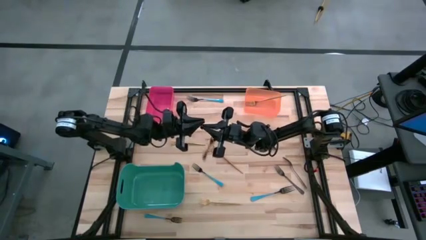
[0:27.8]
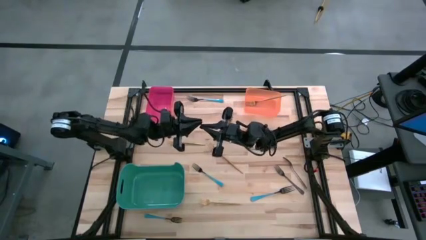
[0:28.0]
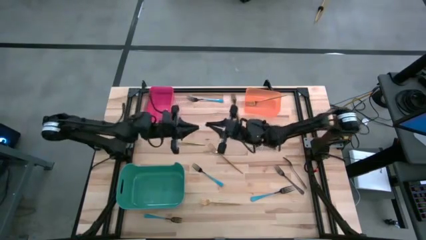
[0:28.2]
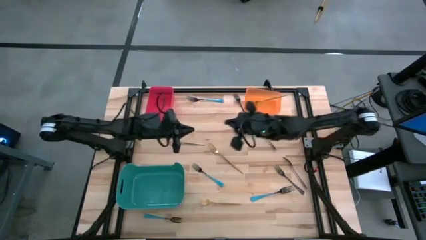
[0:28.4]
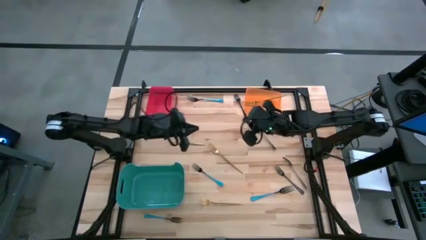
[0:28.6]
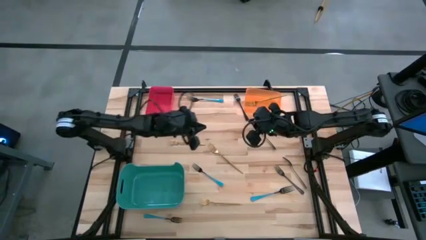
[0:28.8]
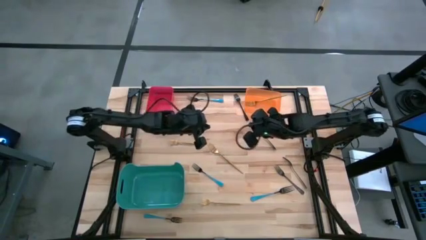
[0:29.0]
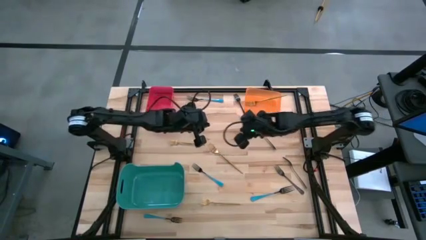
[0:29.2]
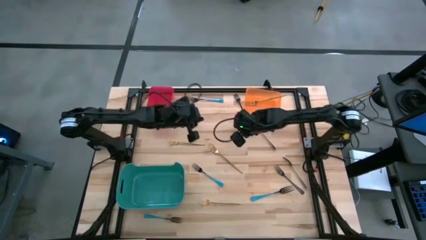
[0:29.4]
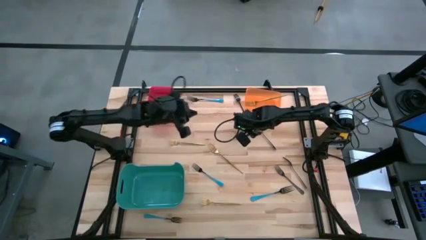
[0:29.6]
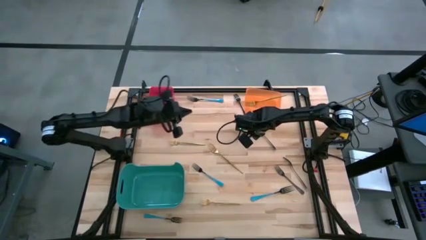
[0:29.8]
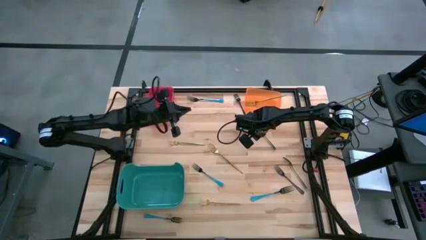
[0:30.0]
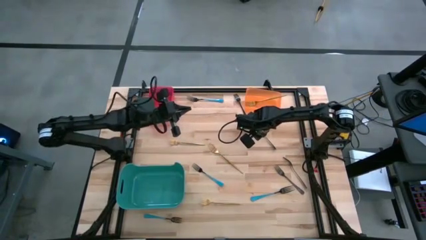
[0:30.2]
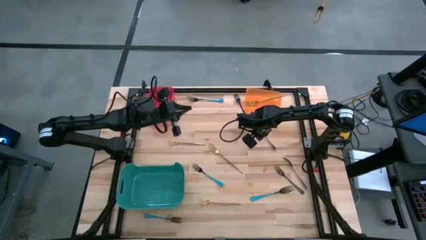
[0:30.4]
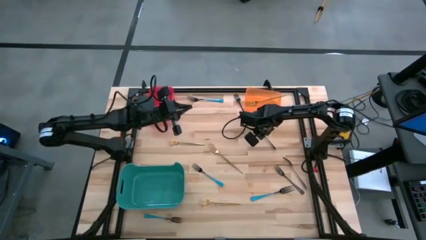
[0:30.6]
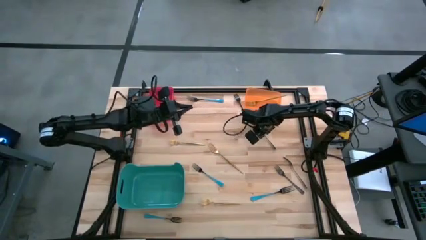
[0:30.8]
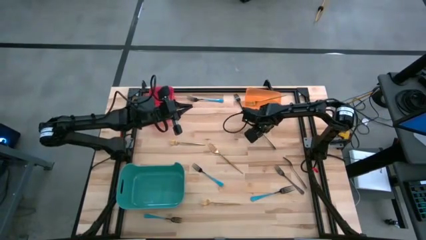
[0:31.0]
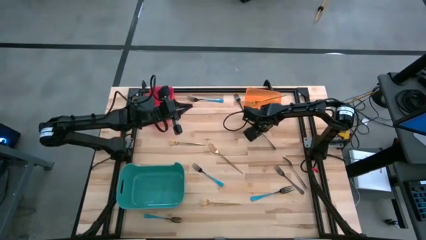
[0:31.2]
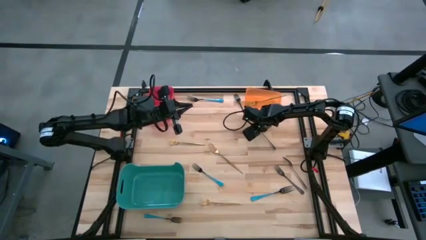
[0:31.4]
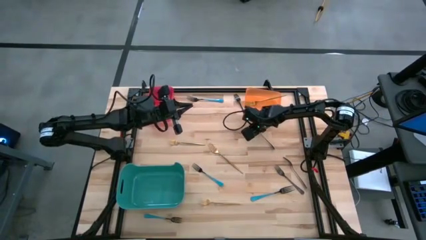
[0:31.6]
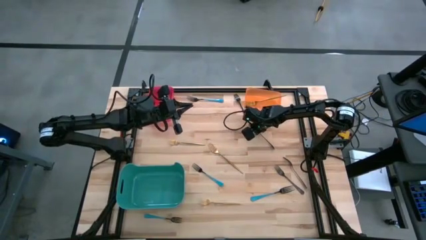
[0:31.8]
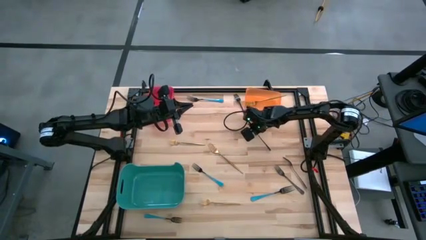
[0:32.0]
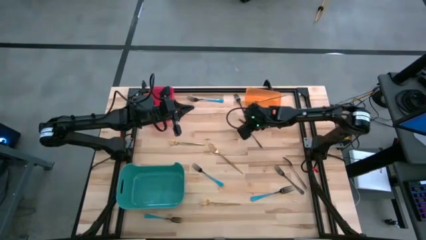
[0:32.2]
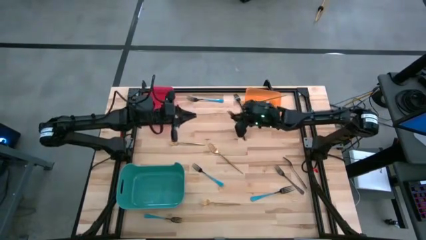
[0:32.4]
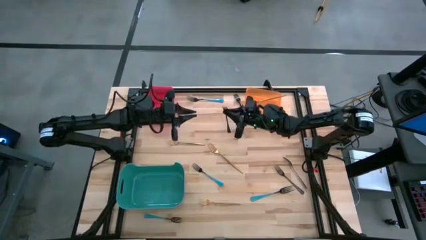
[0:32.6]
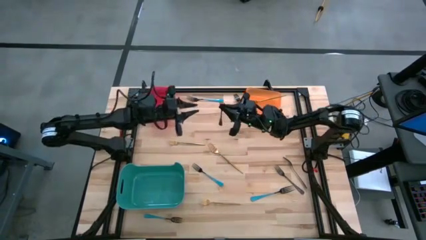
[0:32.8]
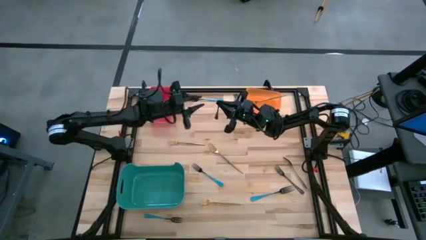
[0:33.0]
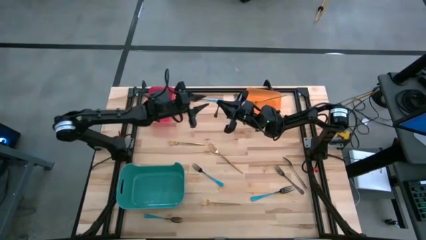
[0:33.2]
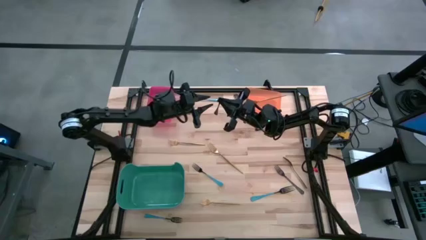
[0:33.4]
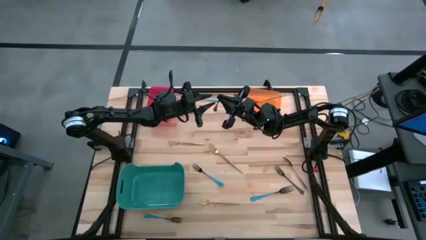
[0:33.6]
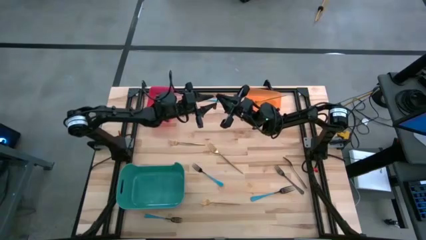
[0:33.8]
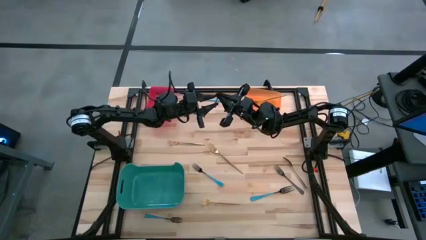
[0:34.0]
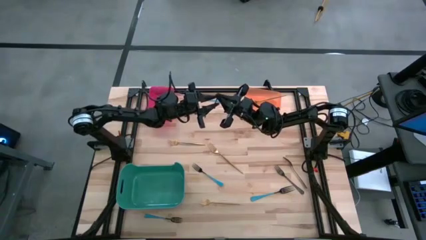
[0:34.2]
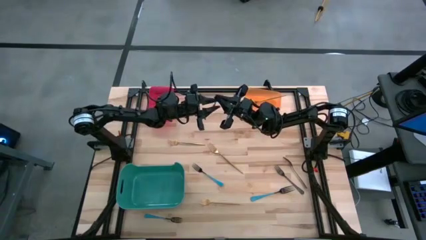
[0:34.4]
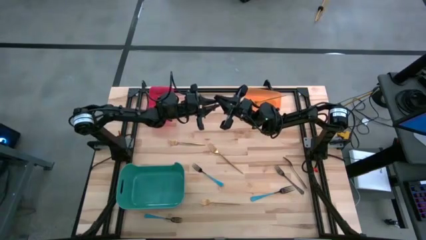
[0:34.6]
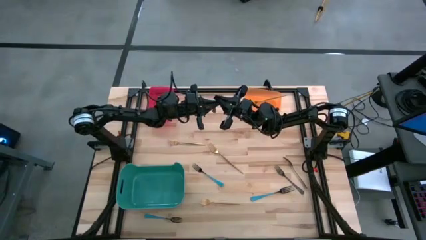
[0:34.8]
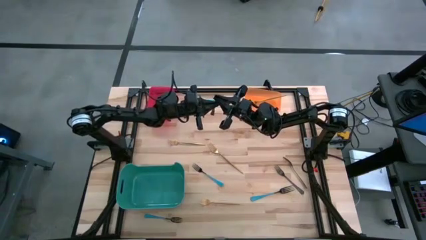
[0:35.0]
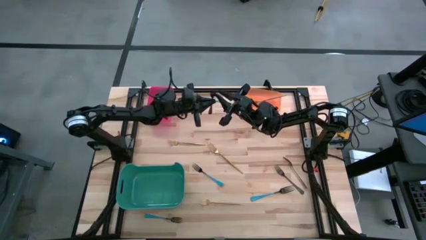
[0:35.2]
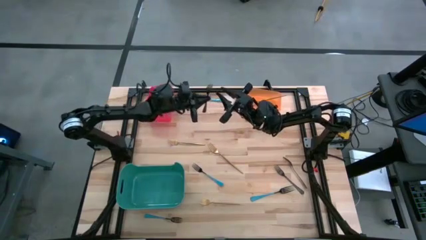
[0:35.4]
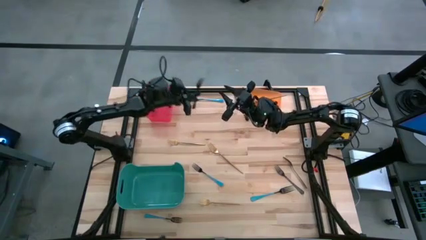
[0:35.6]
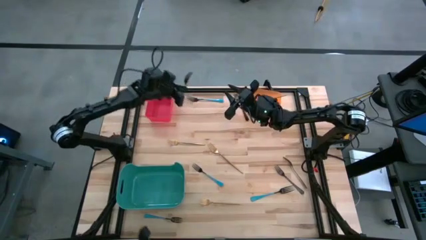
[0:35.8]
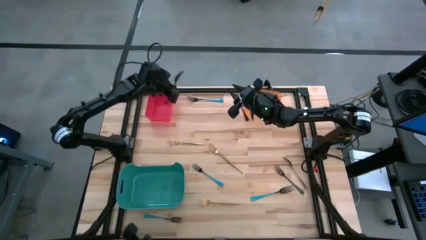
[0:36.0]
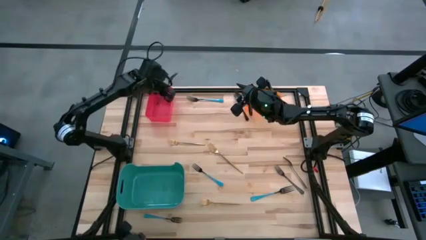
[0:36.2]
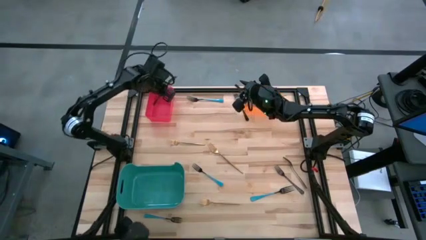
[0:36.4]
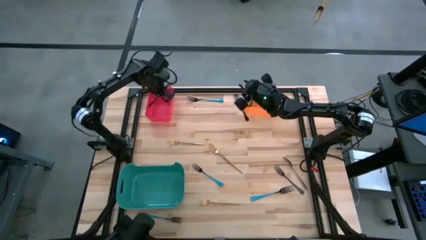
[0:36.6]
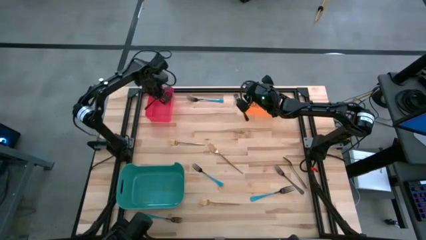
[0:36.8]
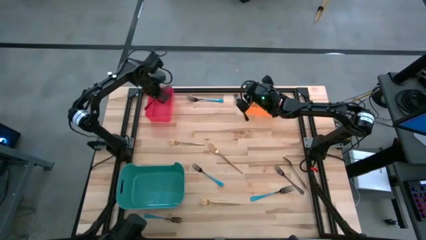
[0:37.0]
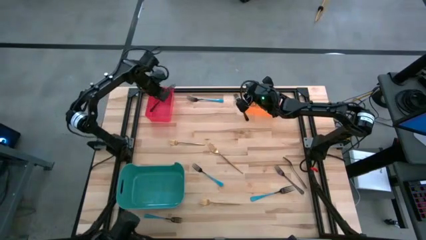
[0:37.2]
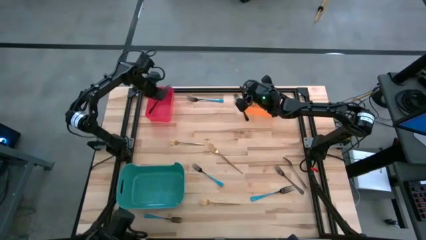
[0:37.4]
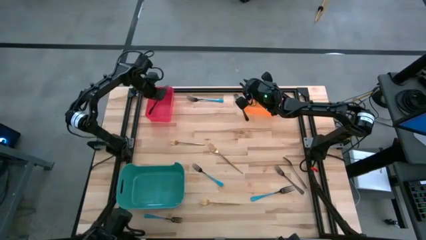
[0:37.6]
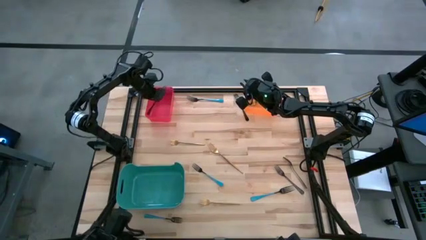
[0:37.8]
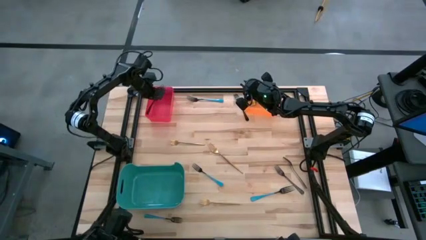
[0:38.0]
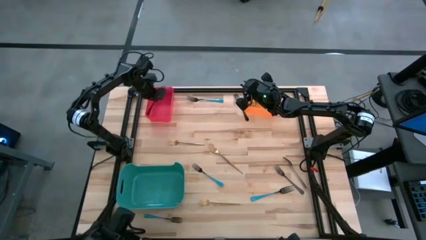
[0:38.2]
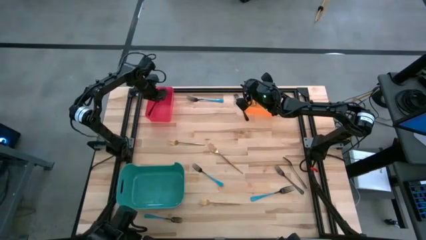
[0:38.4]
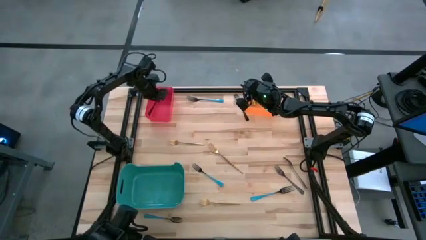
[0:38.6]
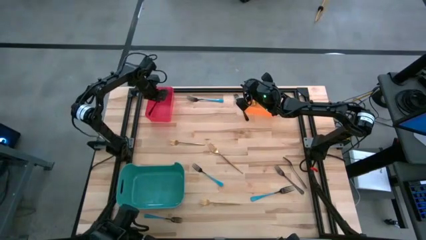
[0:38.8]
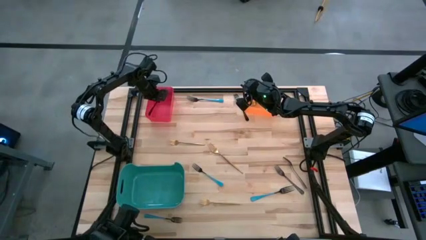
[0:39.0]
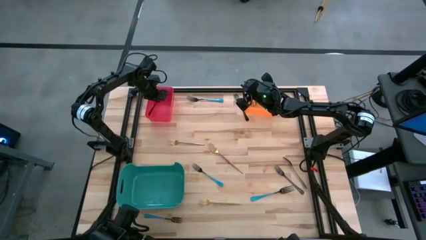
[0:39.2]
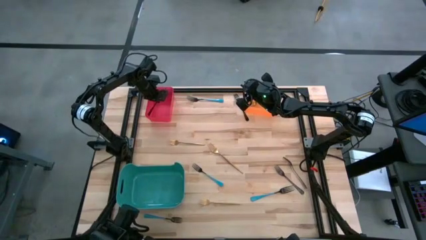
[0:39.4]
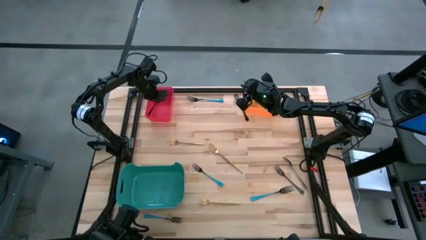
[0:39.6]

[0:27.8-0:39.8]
Task: Sort silverware by color (type)
Put the black fork into the red bin
